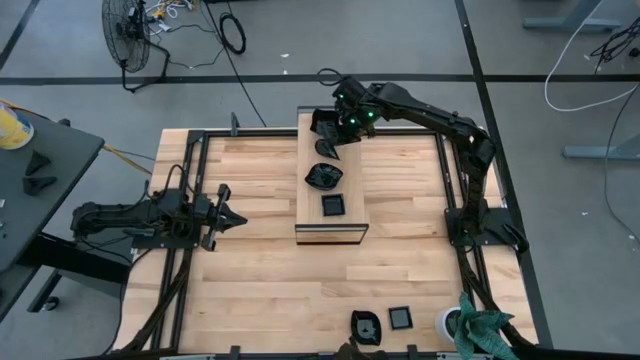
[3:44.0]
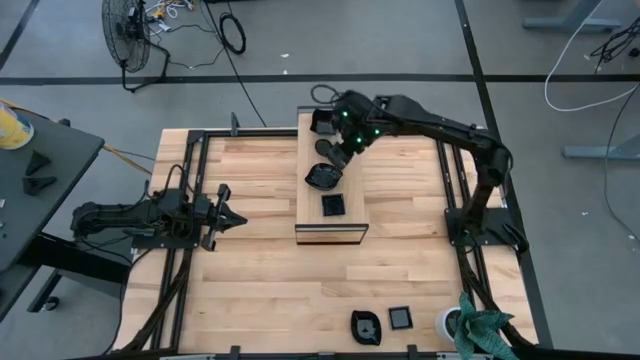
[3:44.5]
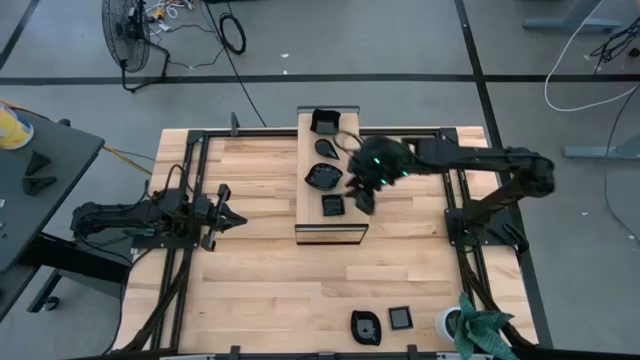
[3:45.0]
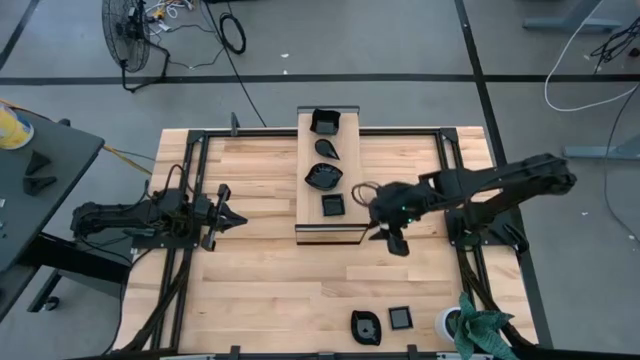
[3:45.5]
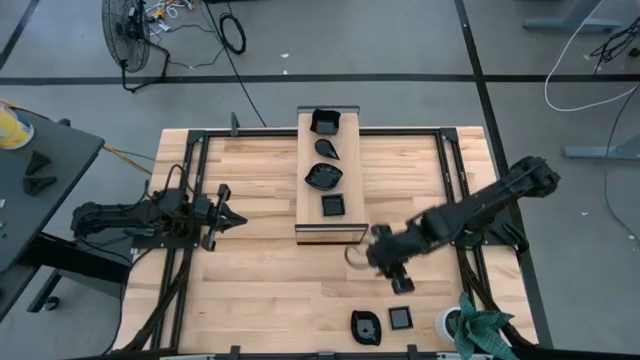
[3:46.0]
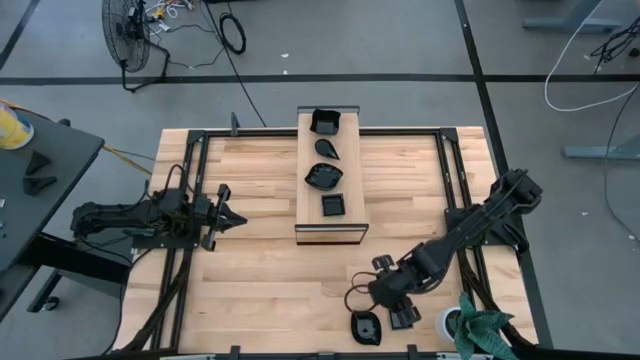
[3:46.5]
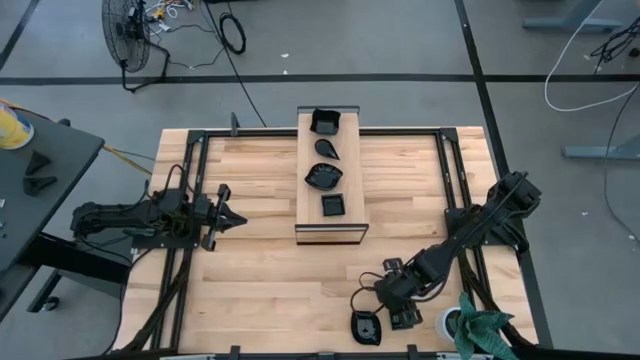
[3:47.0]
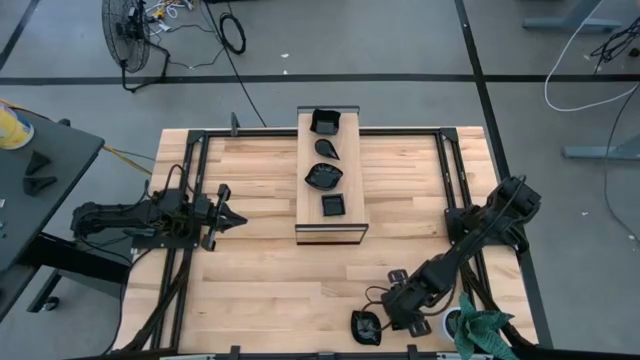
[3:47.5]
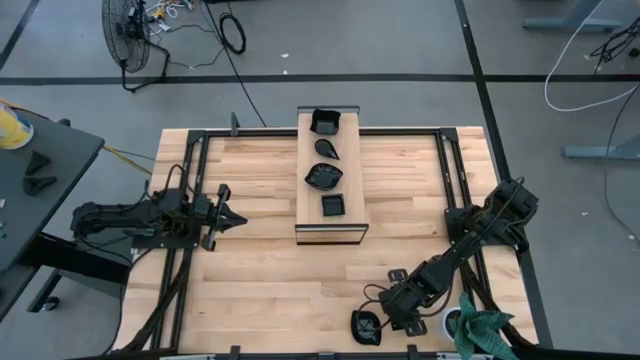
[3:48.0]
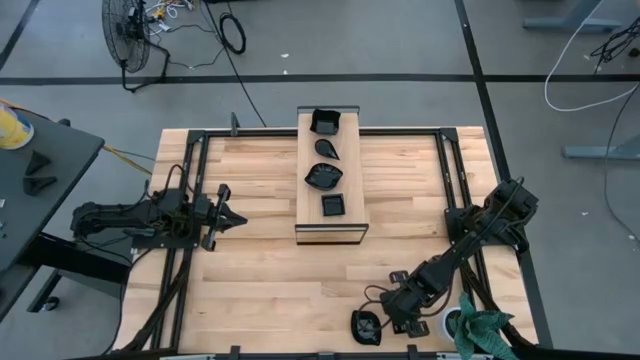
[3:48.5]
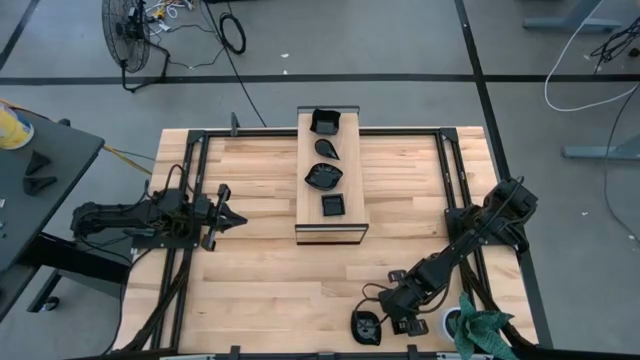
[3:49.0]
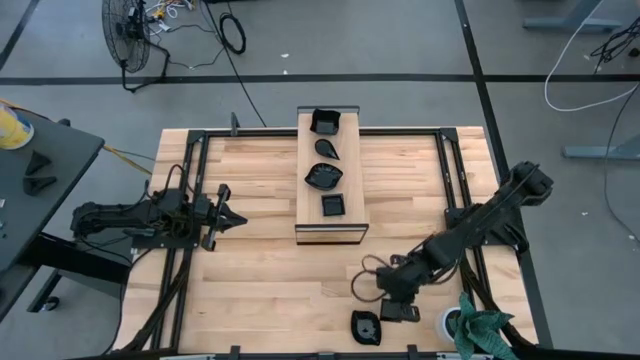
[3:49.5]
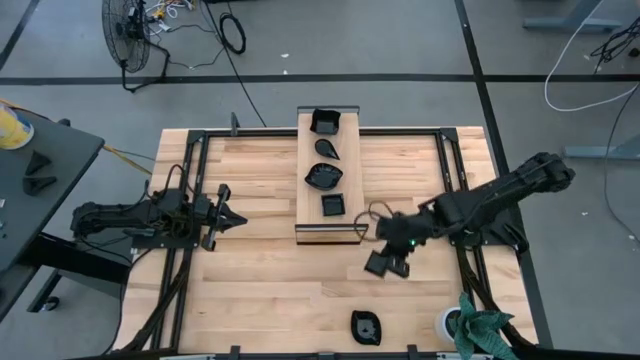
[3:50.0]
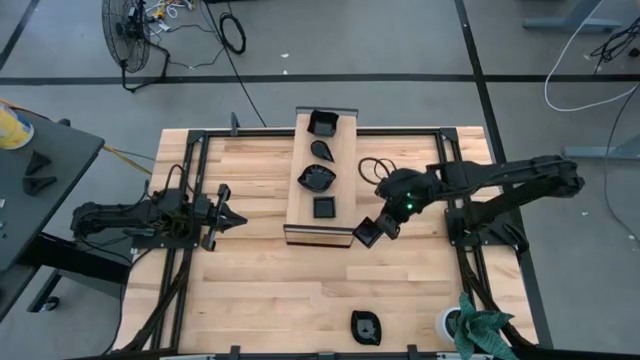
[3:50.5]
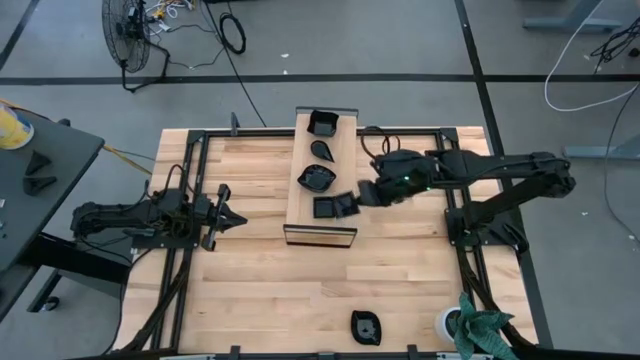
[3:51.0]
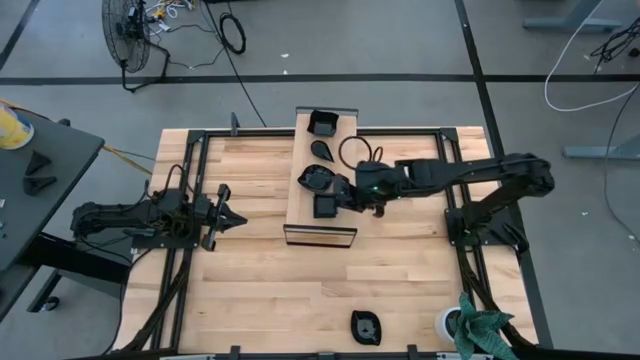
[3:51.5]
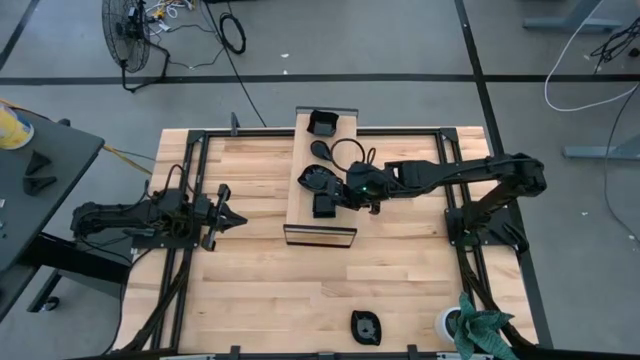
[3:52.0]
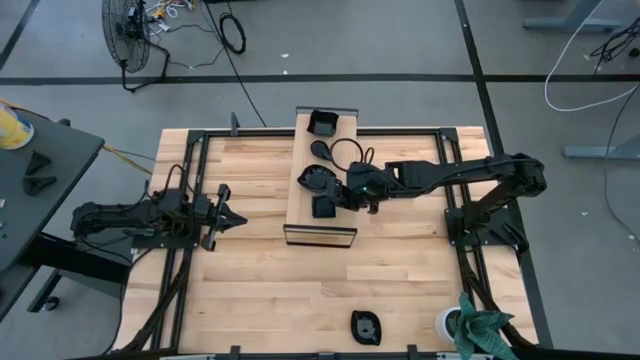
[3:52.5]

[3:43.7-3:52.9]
Task: Pick & Place Mini shaped plates
Stack the square plate on top of the square plate on the shelf

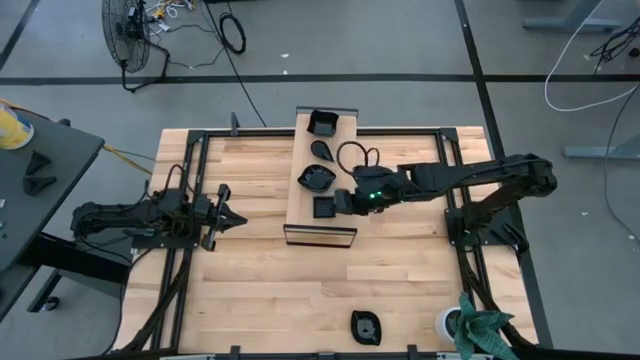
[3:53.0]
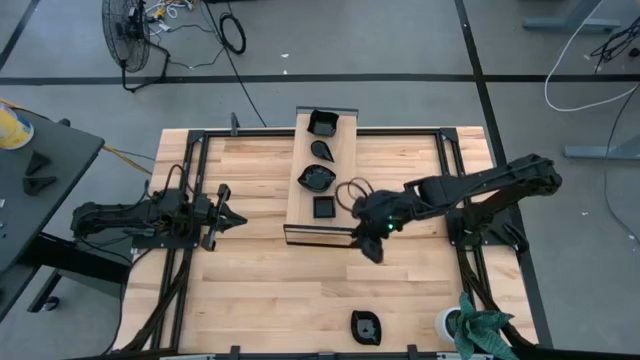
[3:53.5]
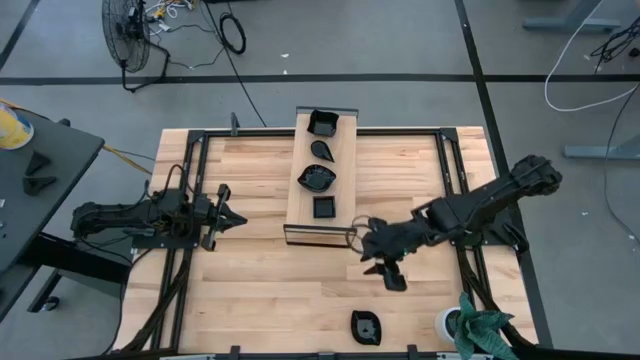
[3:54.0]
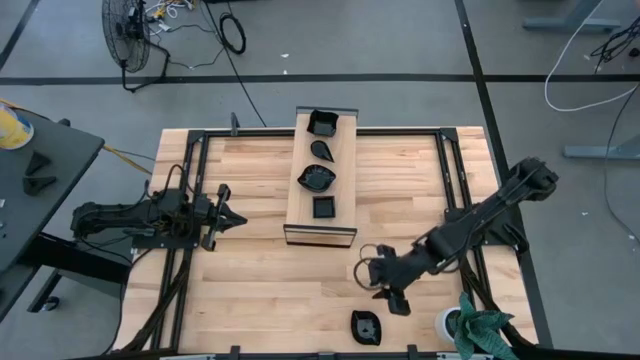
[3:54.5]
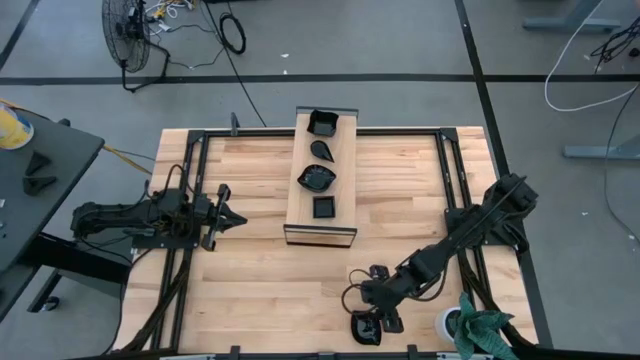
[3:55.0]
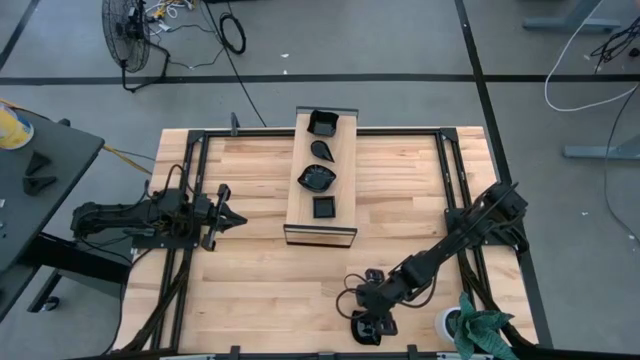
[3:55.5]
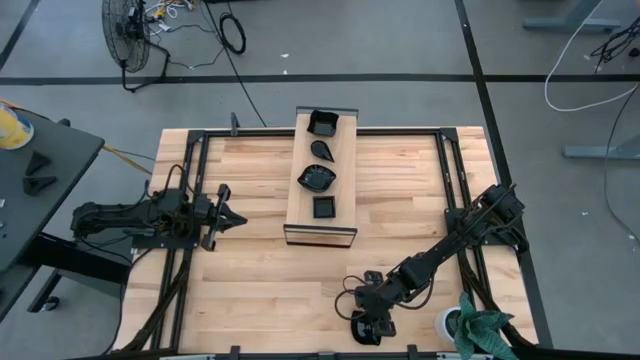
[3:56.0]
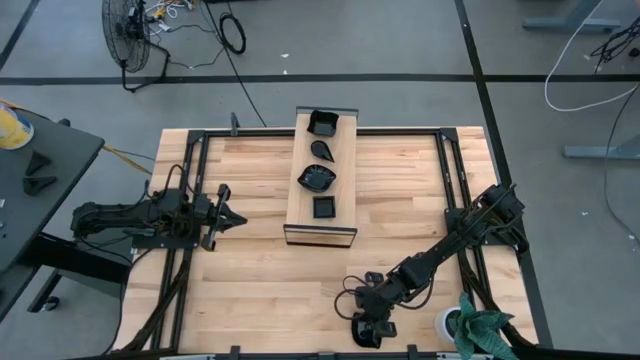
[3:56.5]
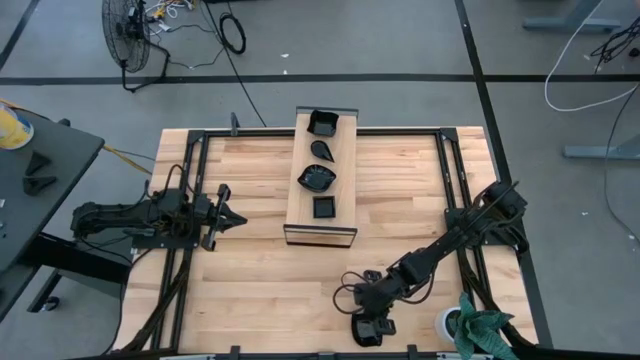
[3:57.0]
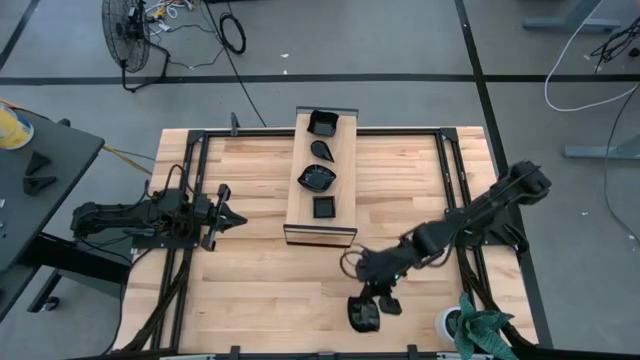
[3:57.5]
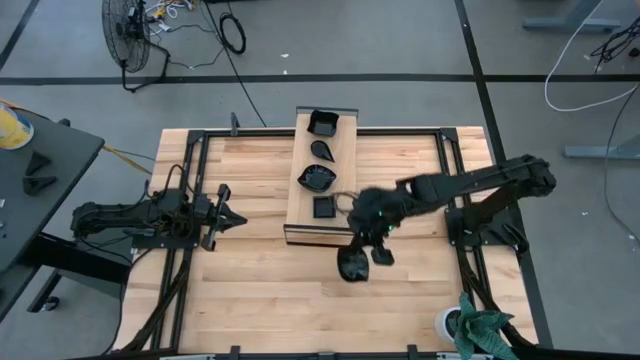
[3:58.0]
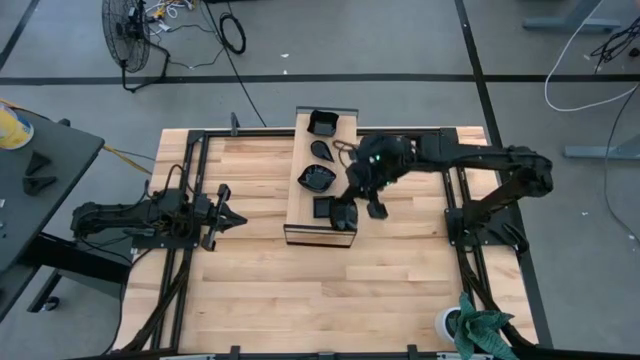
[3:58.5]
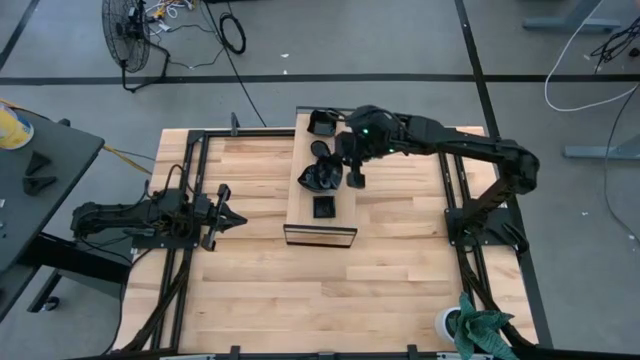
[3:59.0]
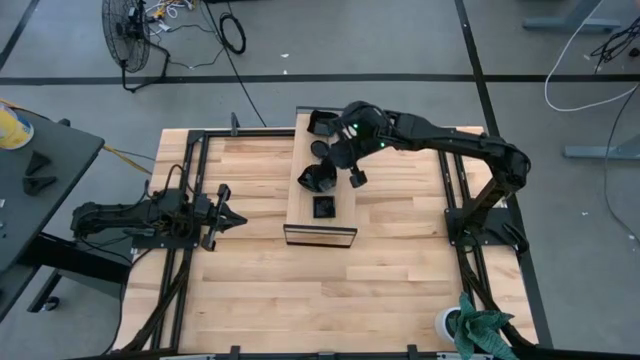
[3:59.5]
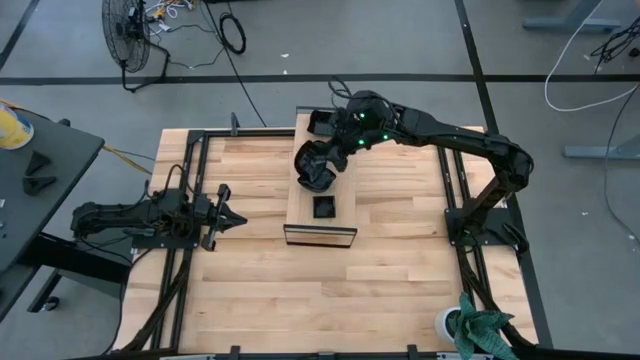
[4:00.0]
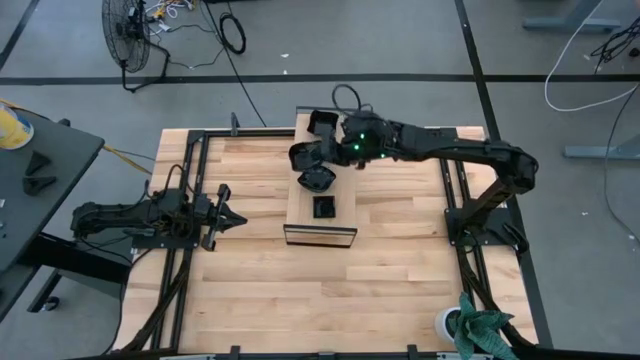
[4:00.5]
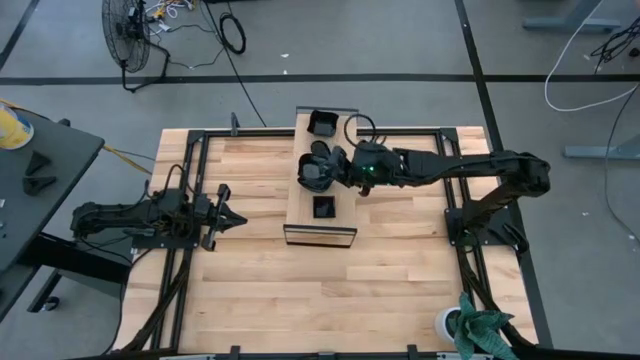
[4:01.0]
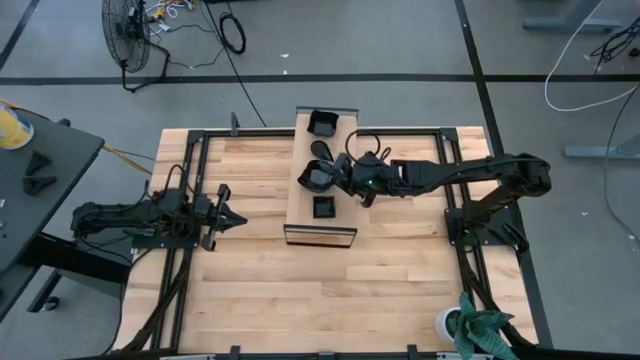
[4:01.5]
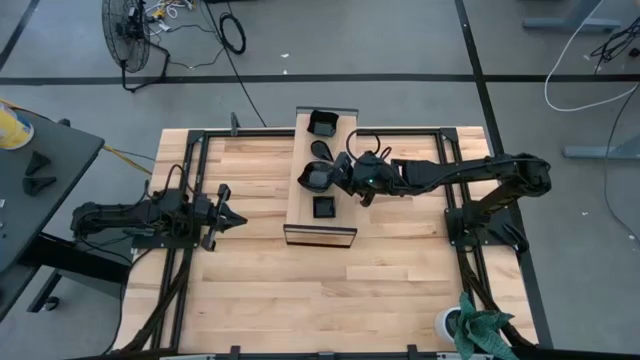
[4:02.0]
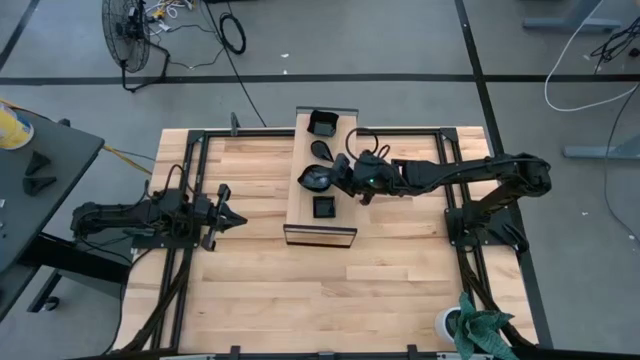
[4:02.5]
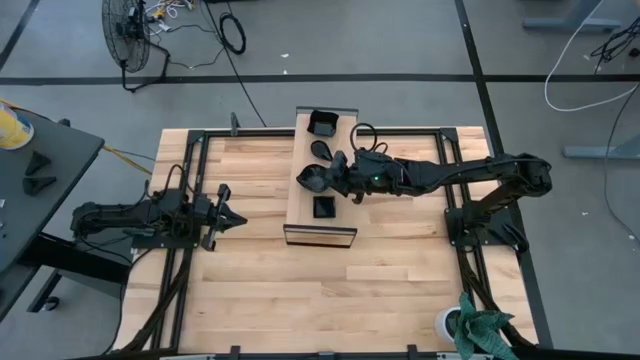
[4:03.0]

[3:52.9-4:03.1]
Stack the leaf-shaped plate on top of the leaf-shaped plate on the shelf

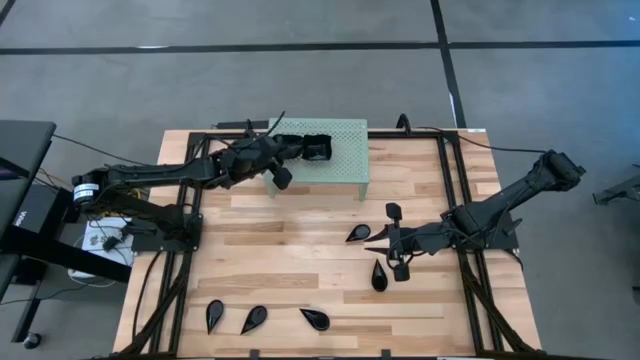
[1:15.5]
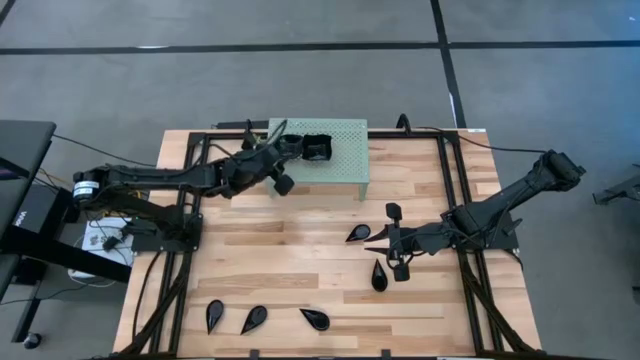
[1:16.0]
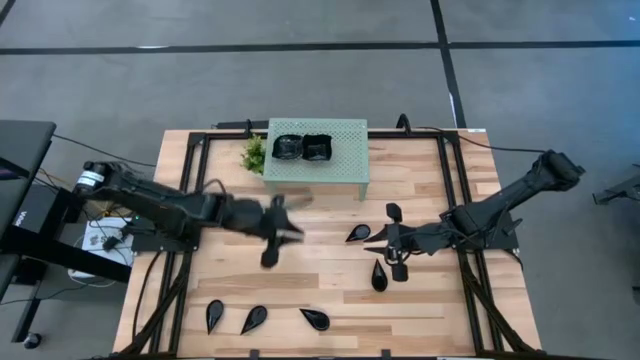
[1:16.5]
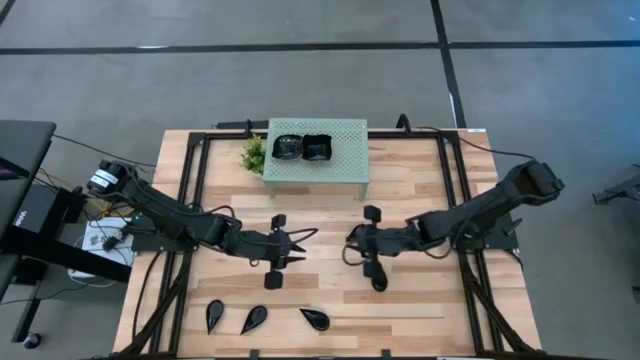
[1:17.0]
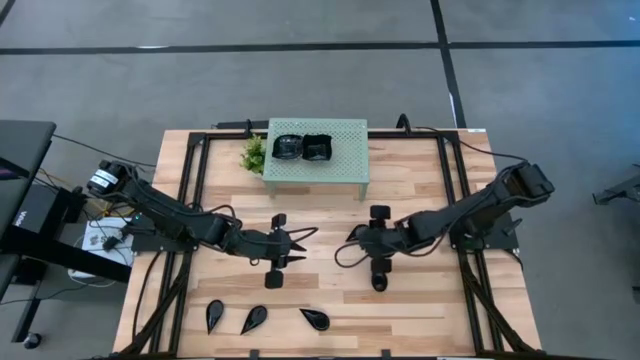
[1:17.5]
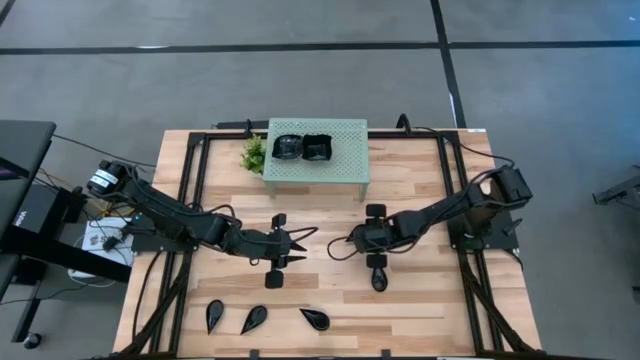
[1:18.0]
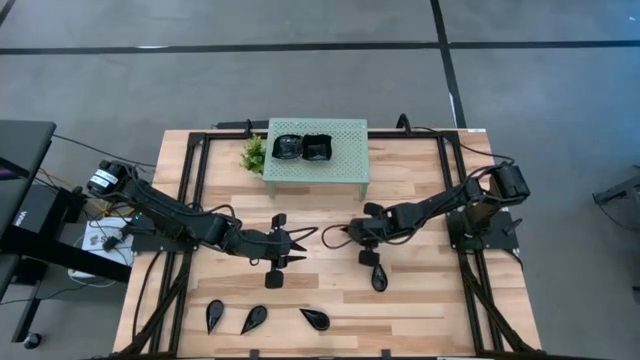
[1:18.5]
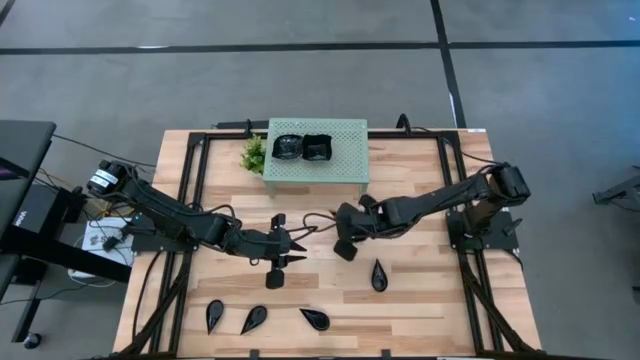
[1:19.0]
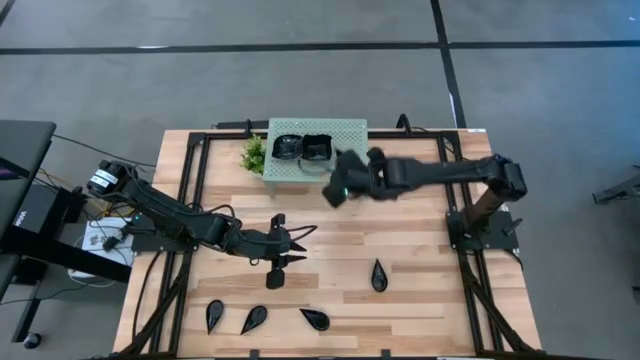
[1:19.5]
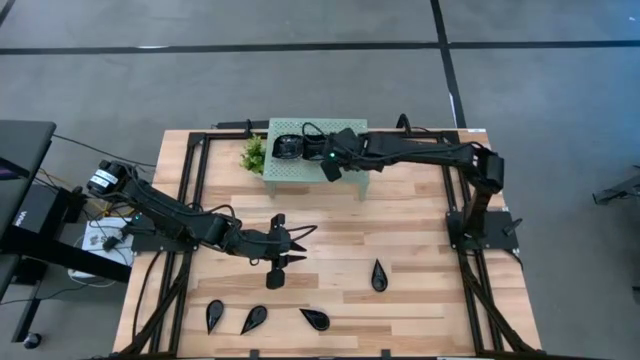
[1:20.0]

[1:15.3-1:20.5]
Task: Pick & Place Mini shaped plates
Put the drop-shaped plate on the shelf
